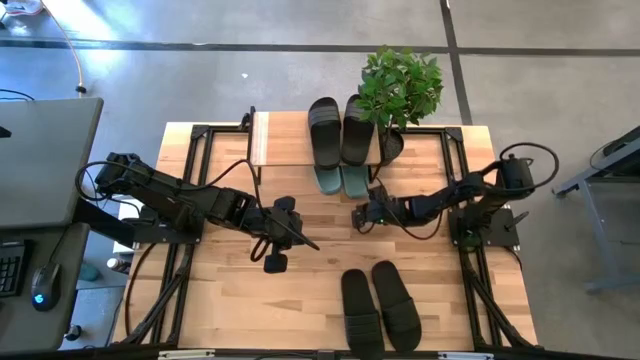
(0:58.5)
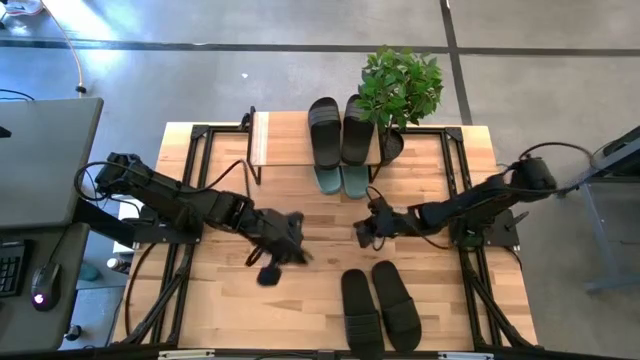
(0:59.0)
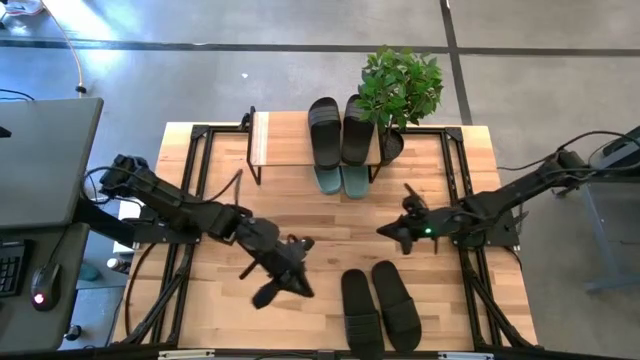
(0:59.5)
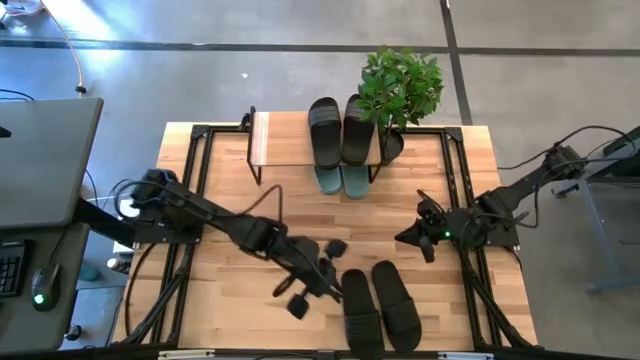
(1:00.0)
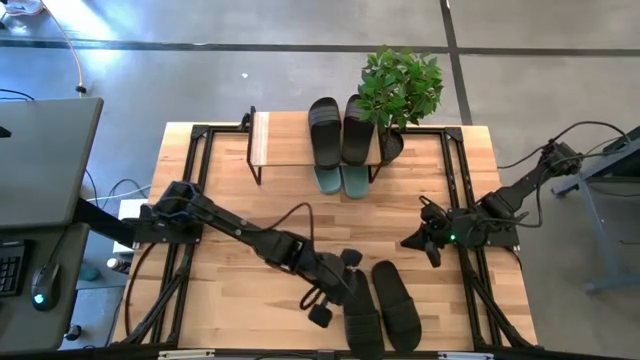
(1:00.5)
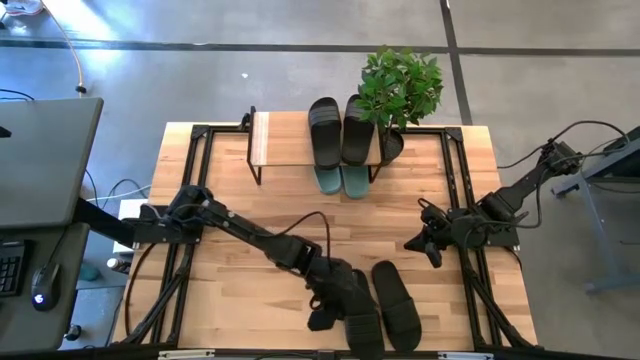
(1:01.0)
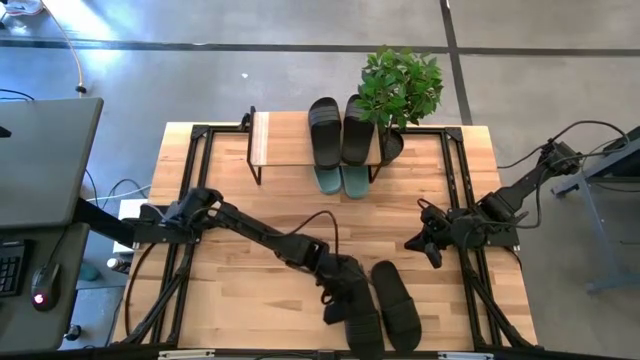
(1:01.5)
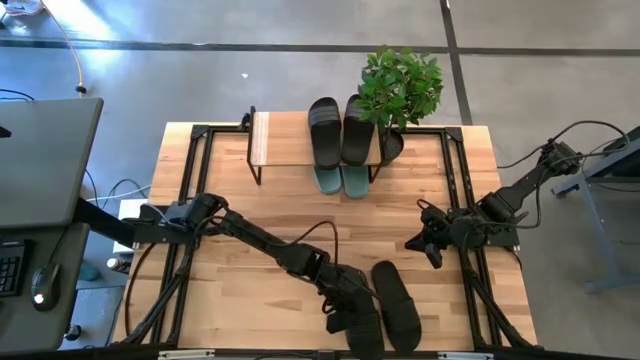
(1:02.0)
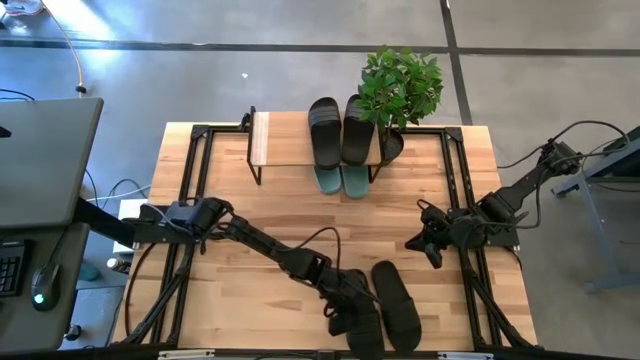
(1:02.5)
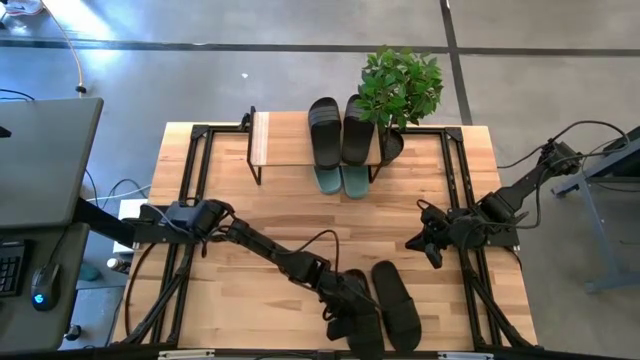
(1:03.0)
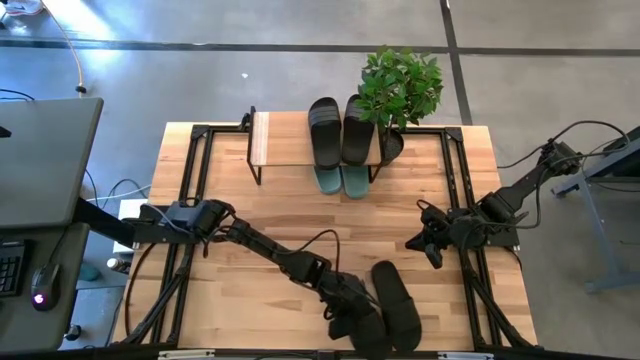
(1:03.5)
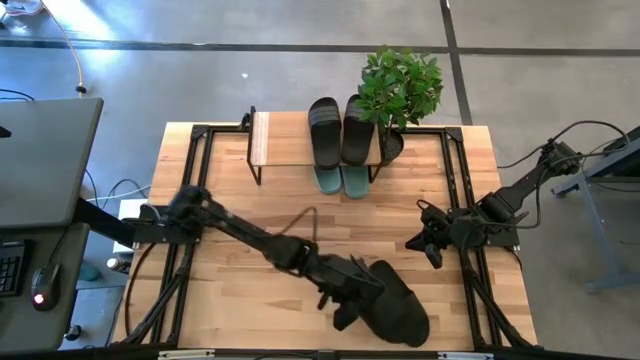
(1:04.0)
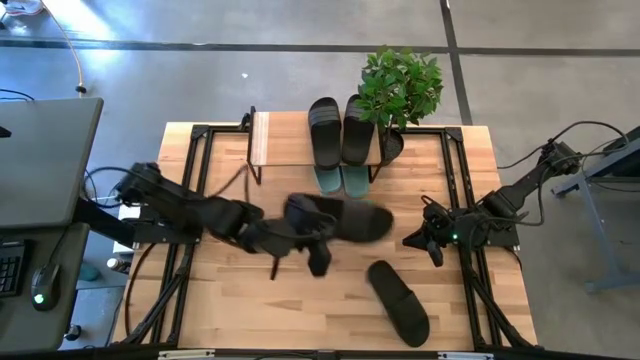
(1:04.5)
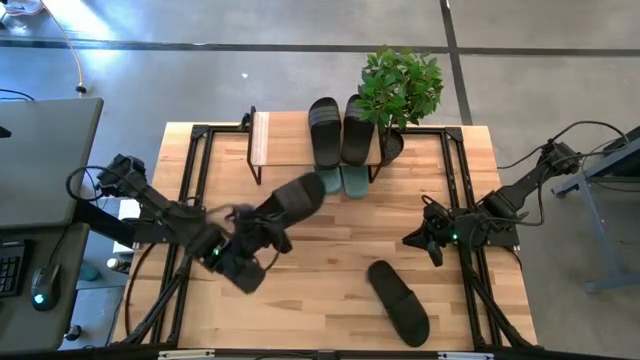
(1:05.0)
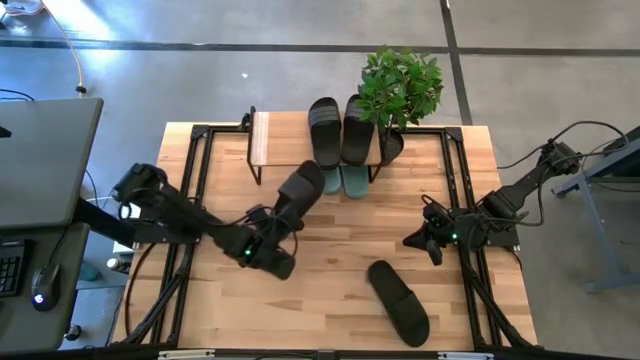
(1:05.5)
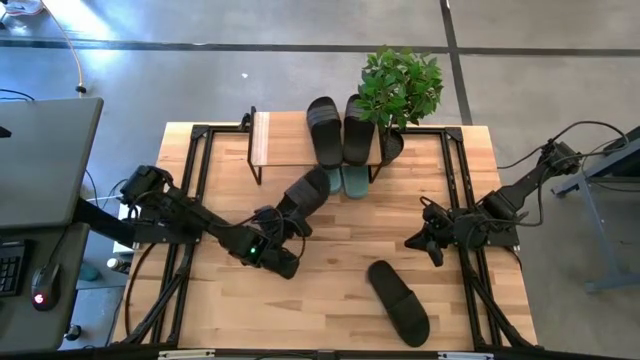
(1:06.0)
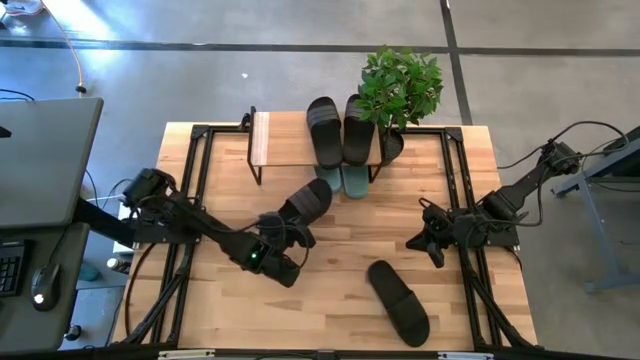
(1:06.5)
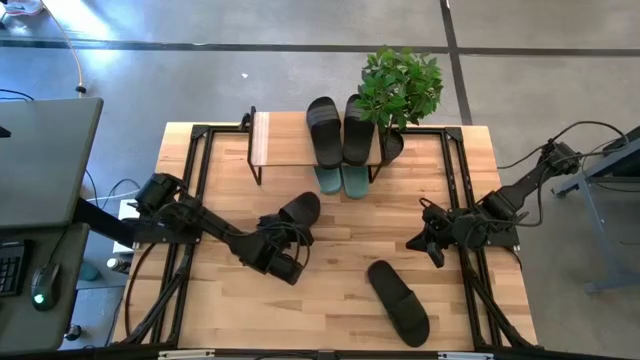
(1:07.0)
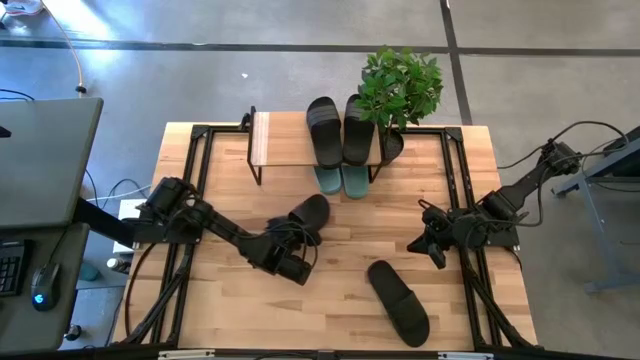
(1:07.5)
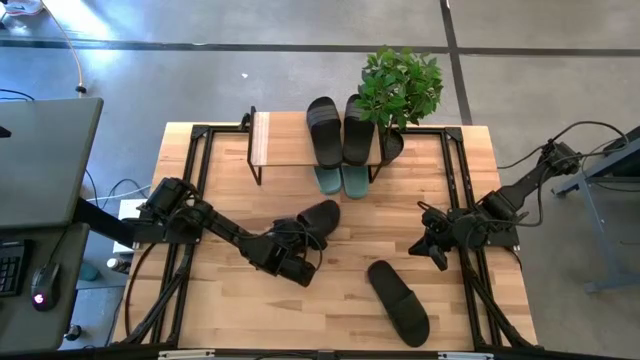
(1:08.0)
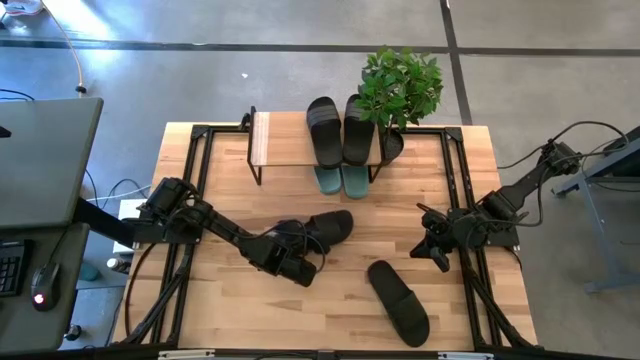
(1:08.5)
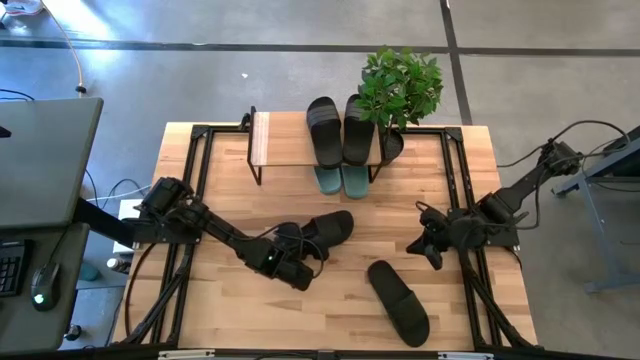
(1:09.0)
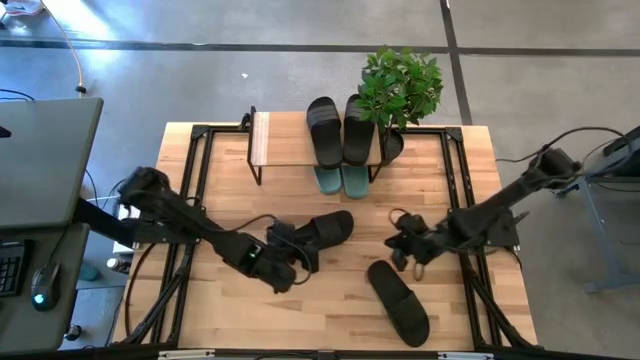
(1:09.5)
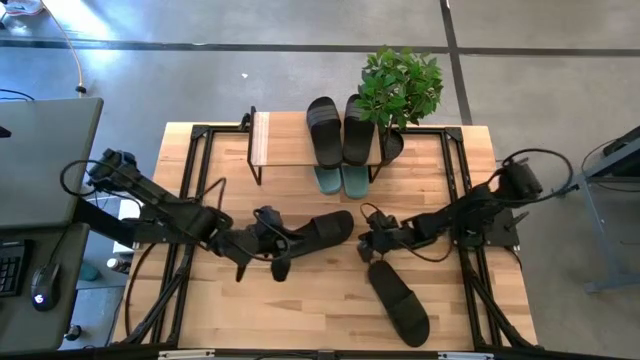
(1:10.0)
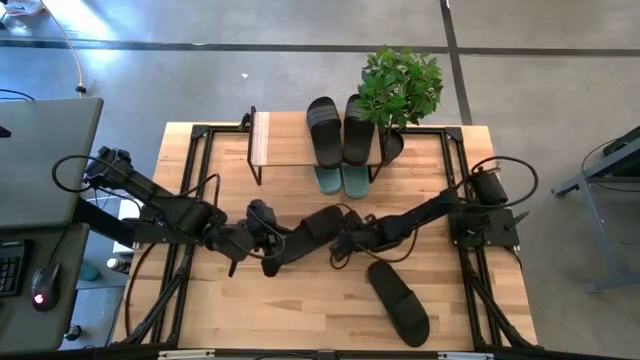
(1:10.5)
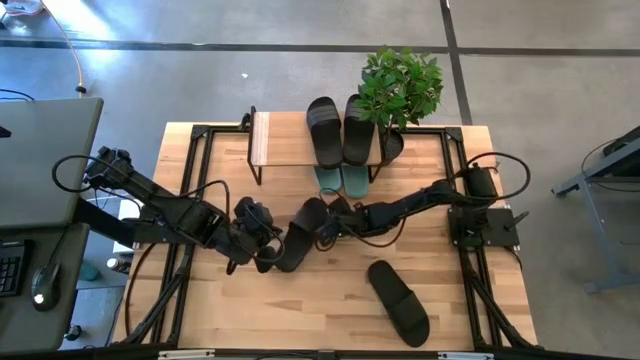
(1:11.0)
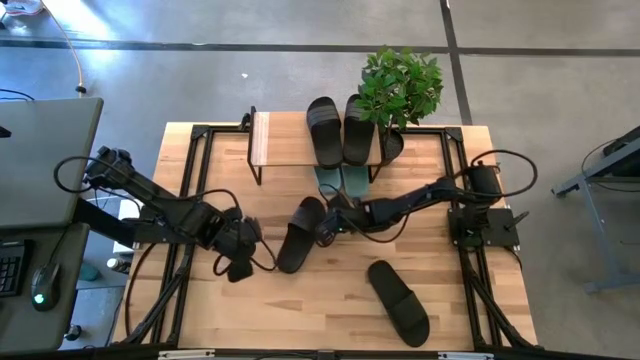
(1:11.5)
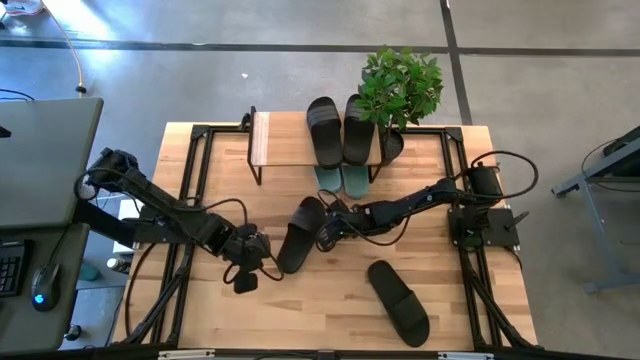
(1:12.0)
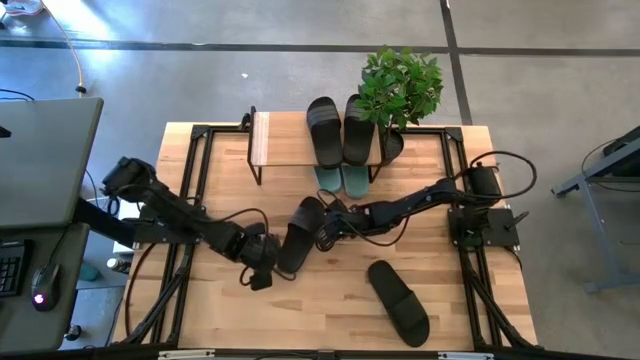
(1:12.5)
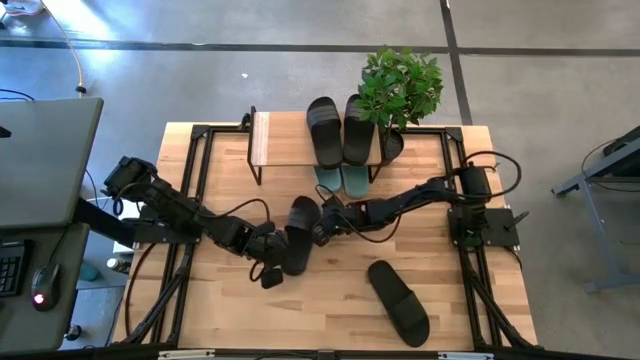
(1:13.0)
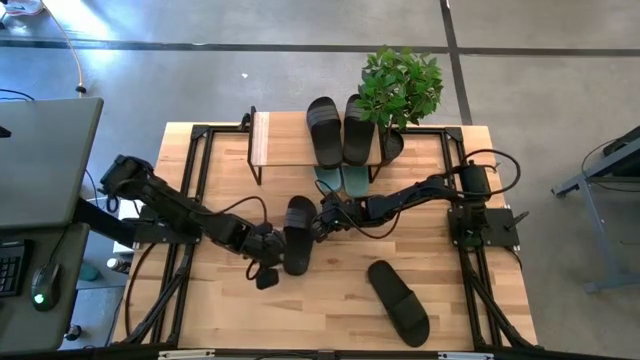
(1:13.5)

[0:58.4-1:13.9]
Task: Pick and place slides into the shelf
Move the black slipper to the center of the table

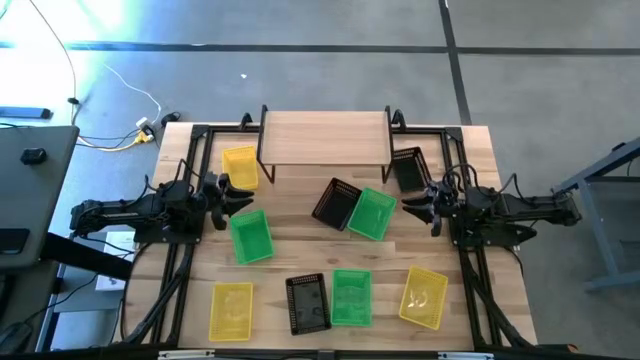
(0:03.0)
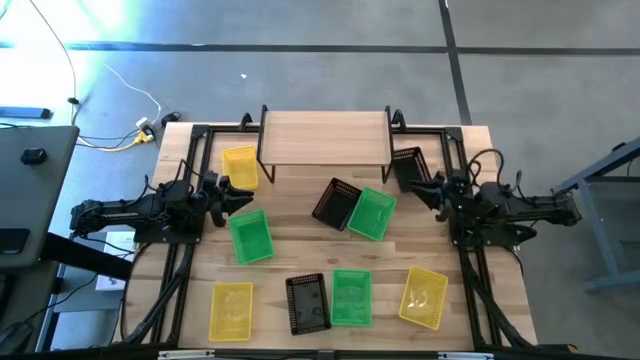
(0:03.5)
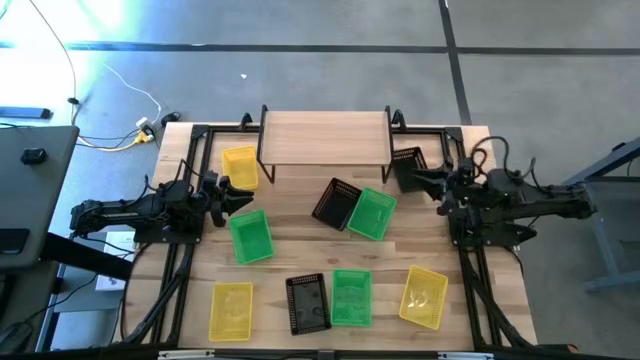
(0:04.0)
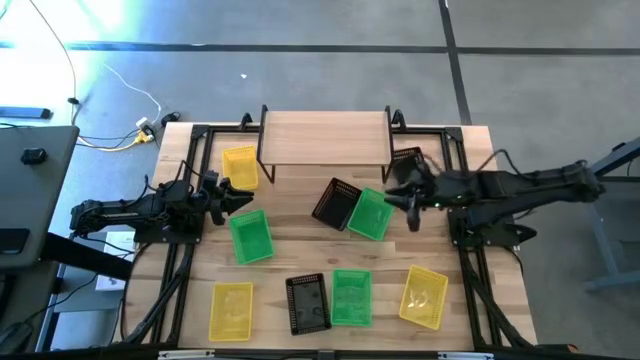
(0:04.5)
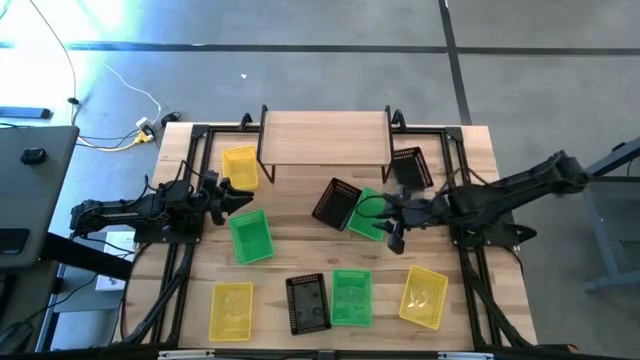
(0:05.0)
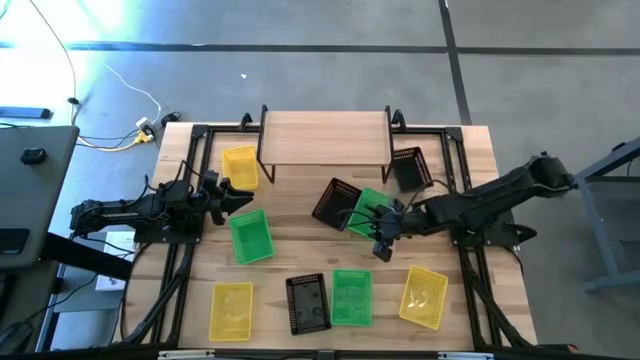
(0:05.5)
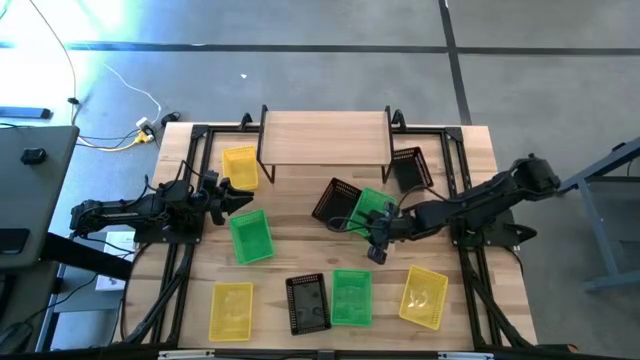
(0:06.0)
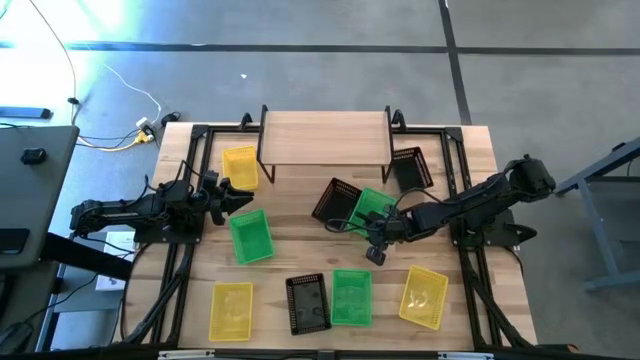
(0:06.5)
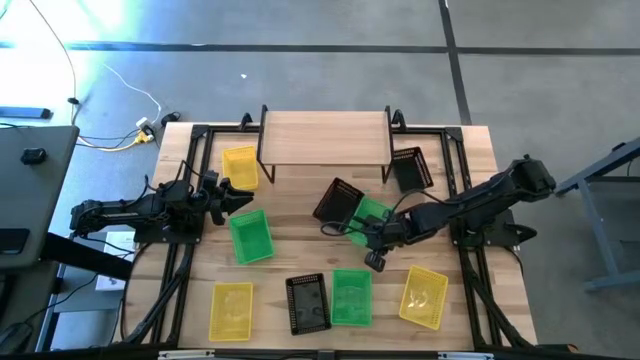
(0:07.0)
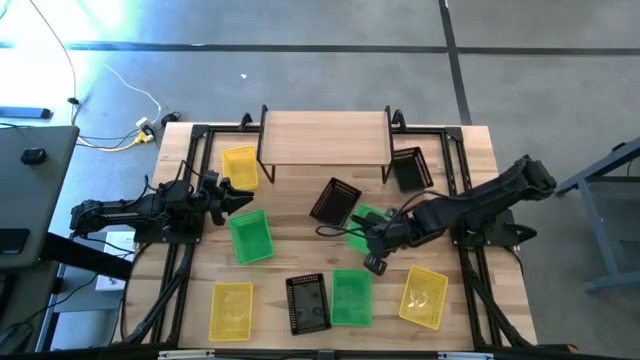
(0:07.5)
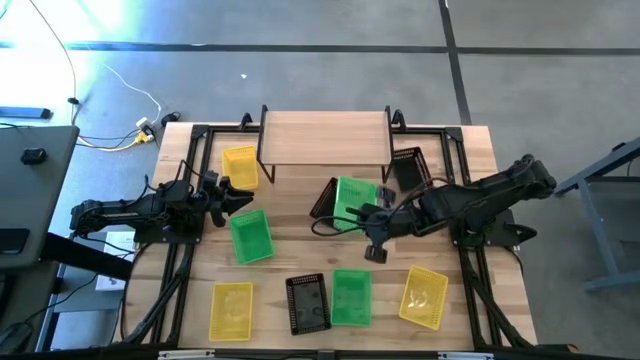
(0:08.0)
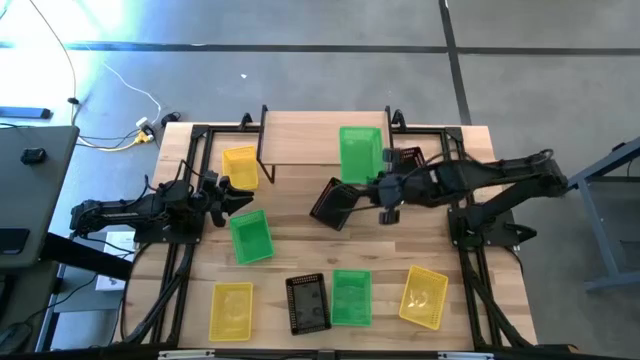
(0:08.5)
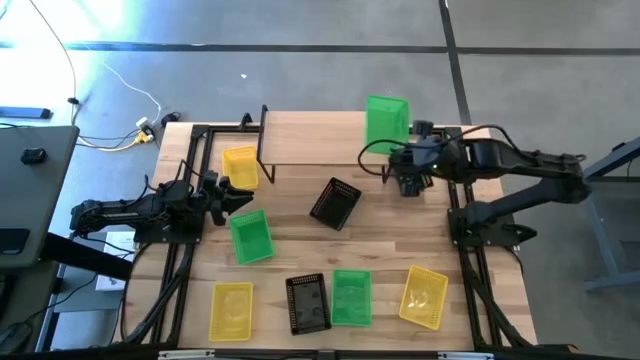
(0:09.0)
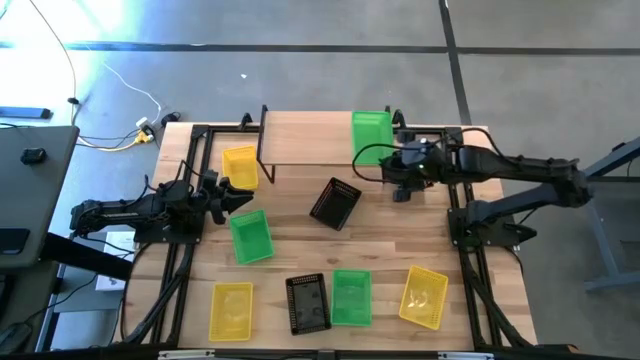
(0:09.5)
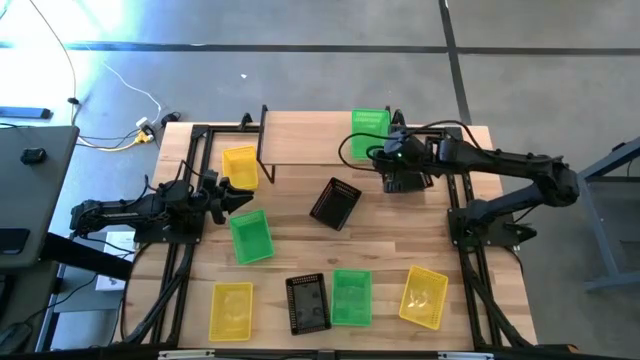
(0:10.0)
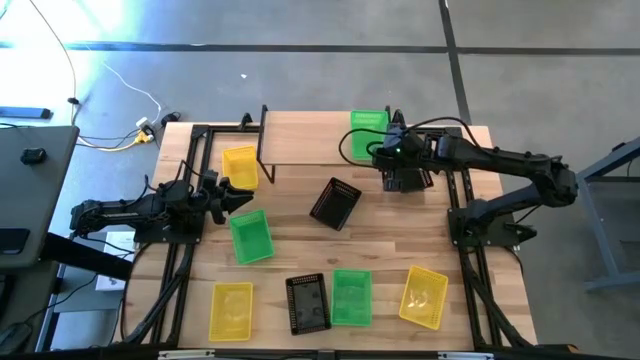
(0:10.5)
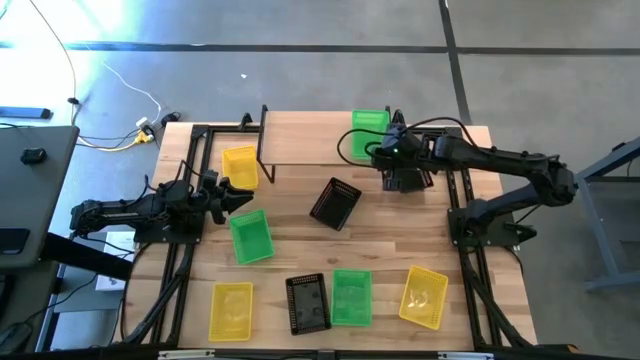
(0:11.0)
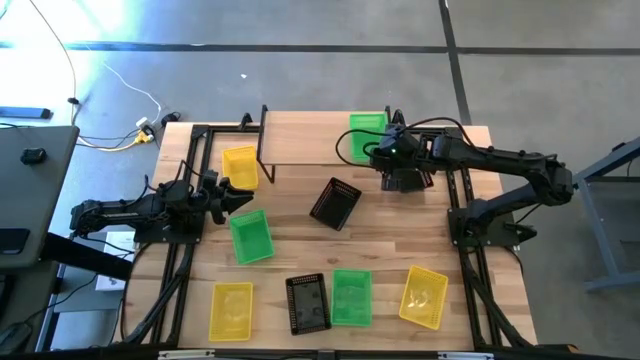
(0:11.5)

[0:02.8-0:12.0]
Task: Stack baskets on shelf by color
Put the top right green bin on the shelf
